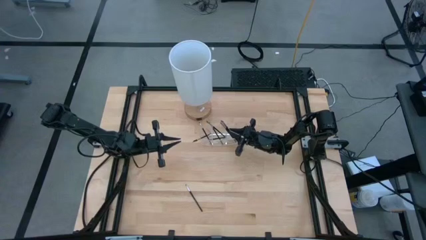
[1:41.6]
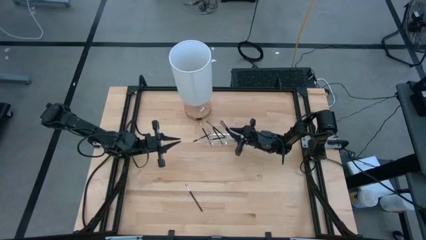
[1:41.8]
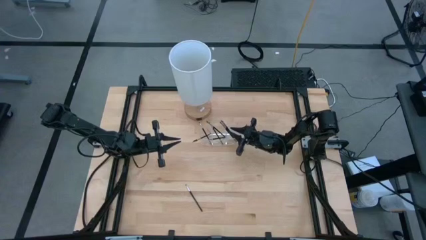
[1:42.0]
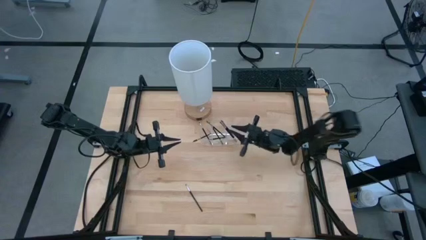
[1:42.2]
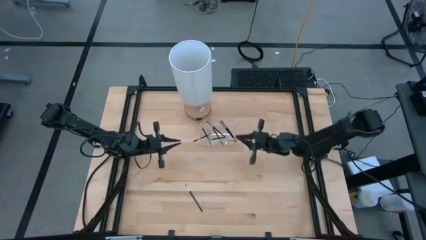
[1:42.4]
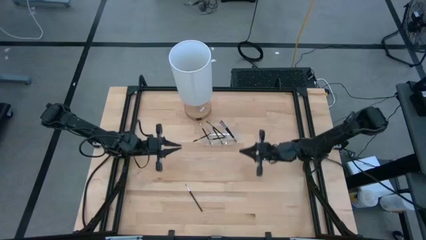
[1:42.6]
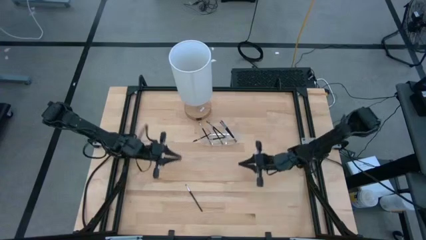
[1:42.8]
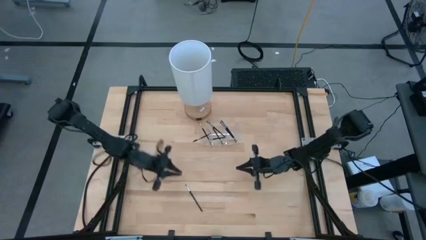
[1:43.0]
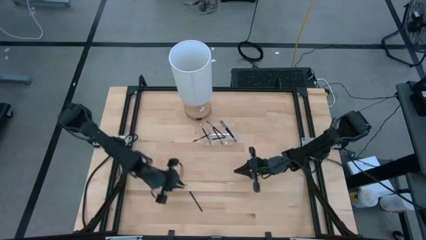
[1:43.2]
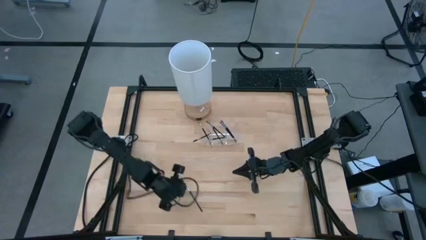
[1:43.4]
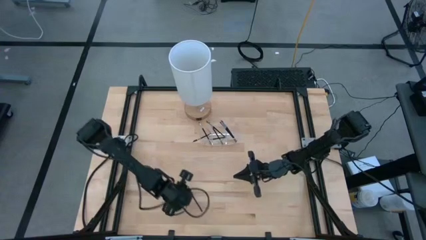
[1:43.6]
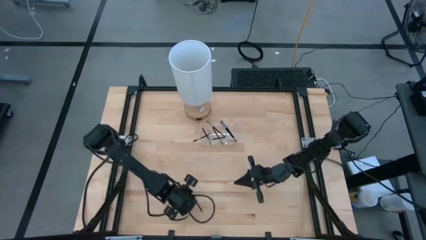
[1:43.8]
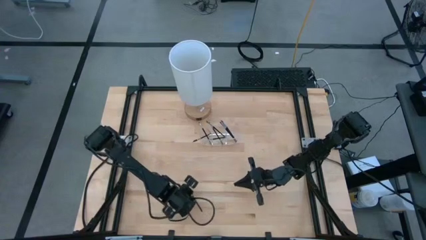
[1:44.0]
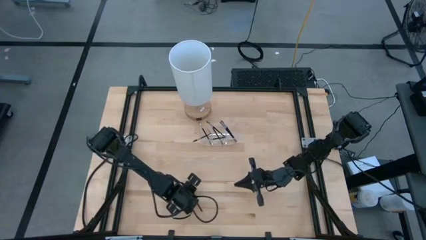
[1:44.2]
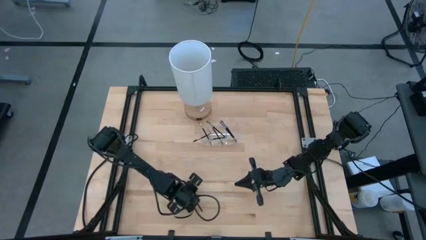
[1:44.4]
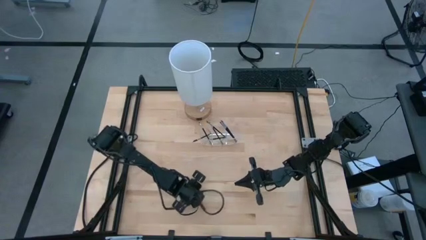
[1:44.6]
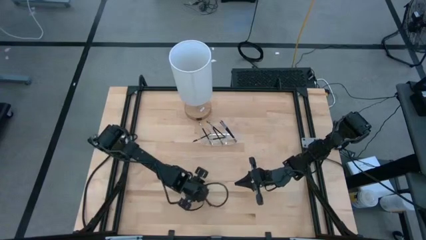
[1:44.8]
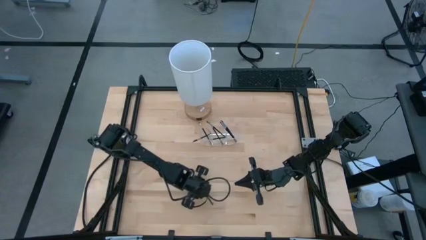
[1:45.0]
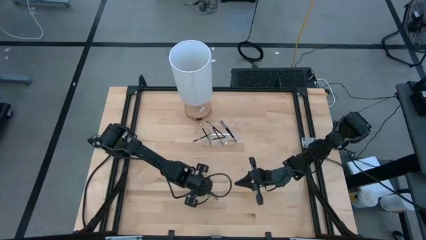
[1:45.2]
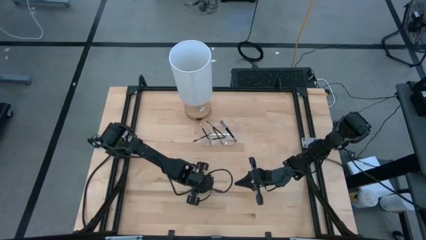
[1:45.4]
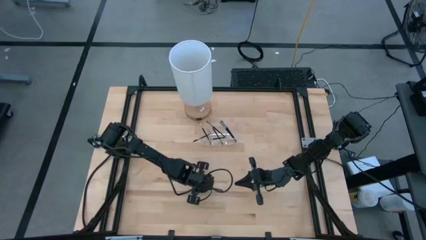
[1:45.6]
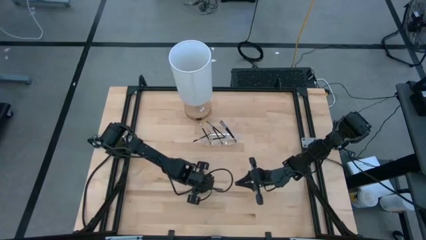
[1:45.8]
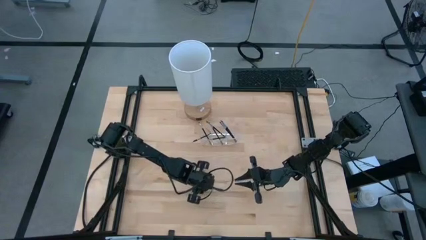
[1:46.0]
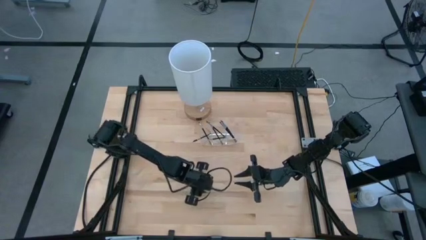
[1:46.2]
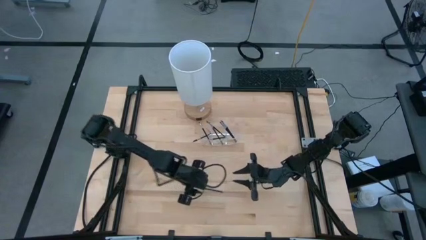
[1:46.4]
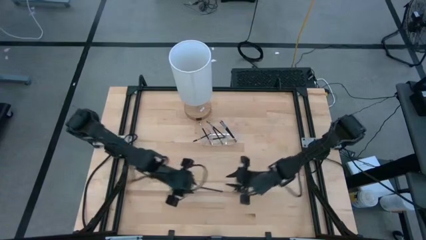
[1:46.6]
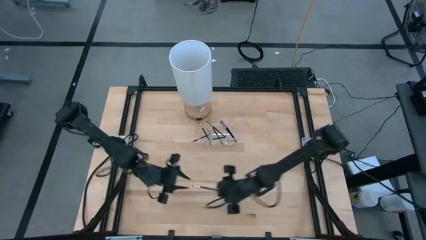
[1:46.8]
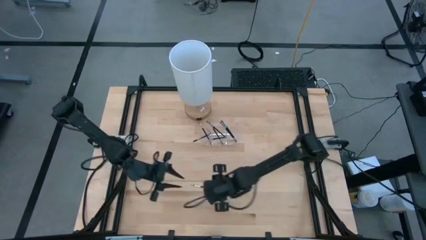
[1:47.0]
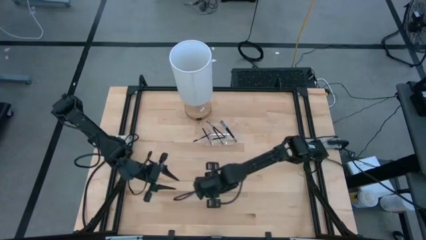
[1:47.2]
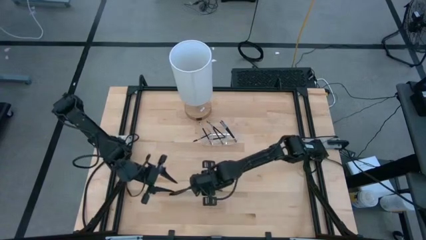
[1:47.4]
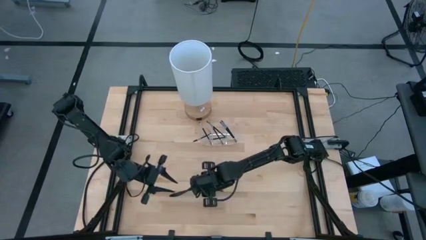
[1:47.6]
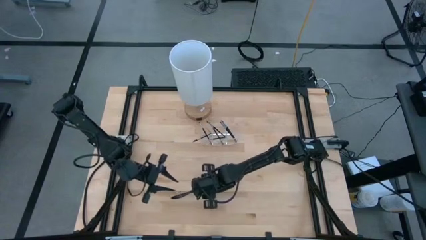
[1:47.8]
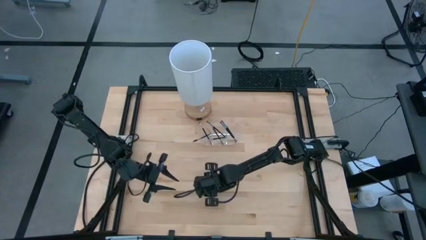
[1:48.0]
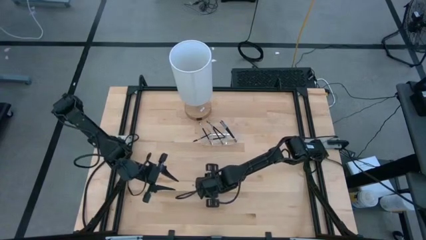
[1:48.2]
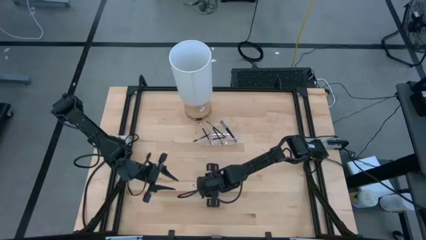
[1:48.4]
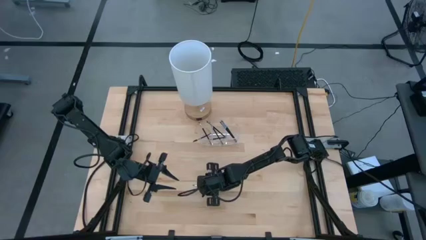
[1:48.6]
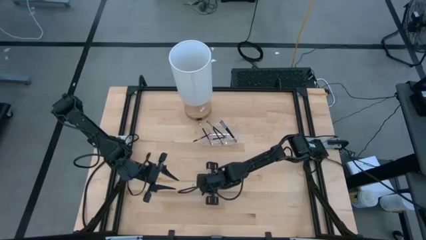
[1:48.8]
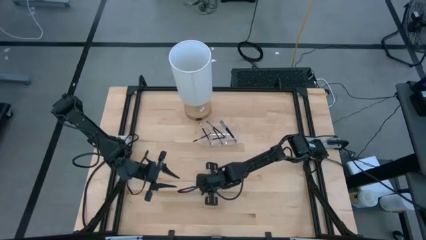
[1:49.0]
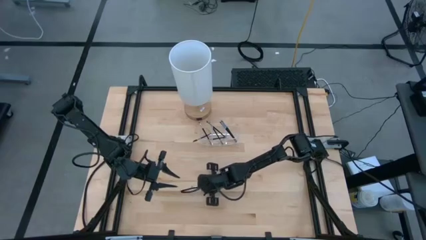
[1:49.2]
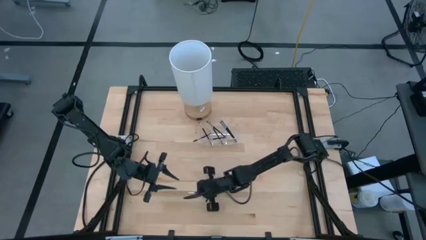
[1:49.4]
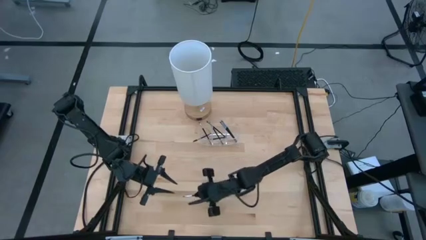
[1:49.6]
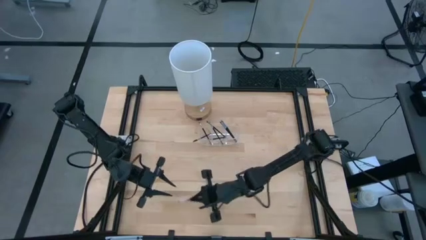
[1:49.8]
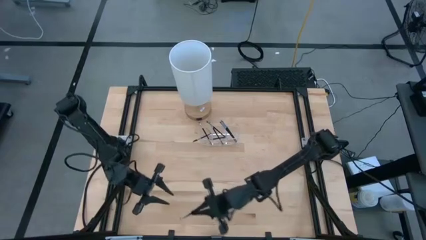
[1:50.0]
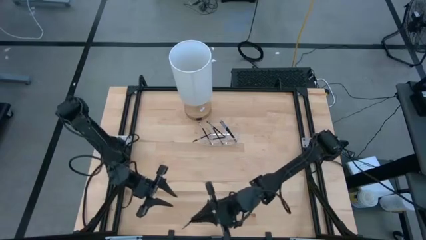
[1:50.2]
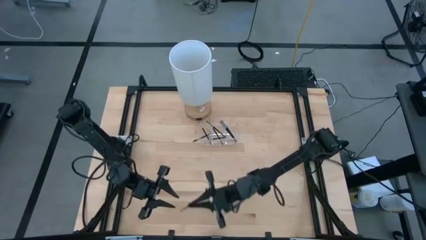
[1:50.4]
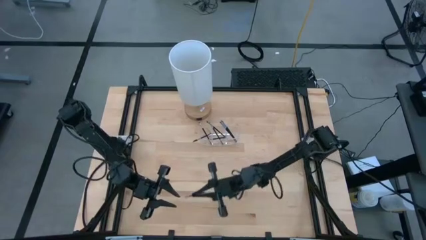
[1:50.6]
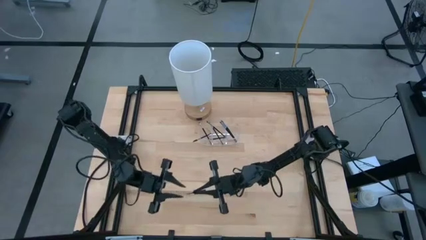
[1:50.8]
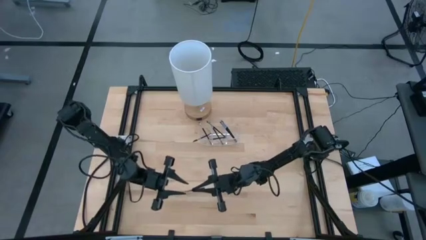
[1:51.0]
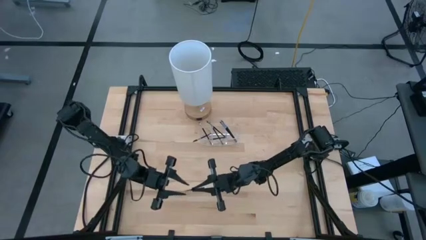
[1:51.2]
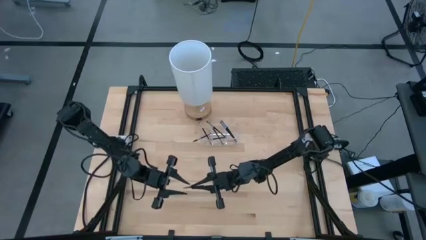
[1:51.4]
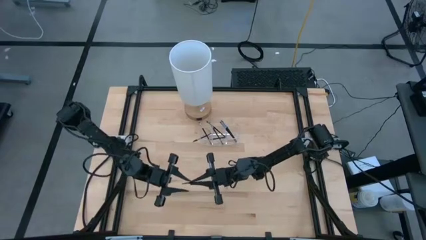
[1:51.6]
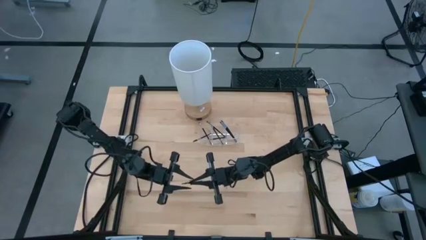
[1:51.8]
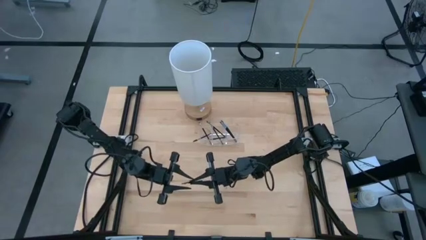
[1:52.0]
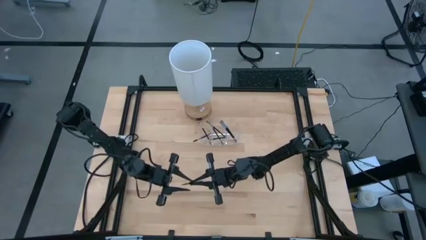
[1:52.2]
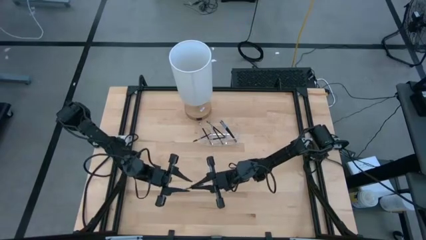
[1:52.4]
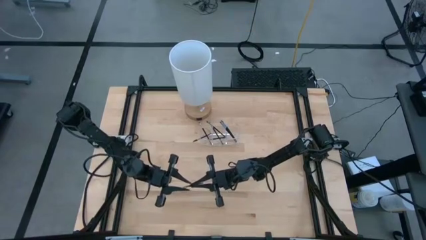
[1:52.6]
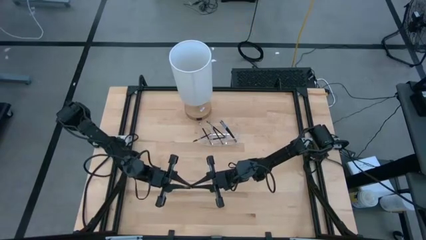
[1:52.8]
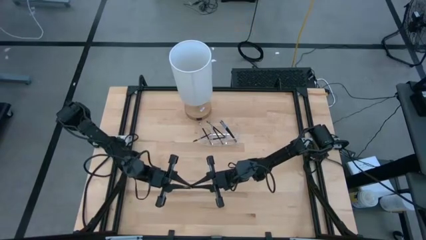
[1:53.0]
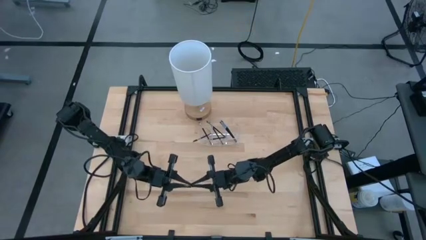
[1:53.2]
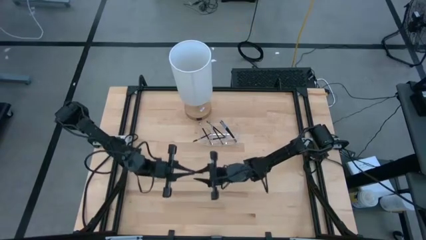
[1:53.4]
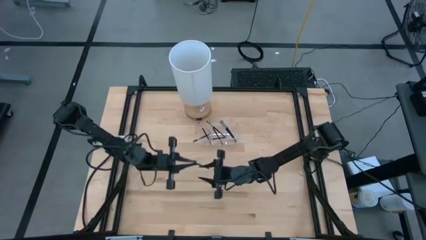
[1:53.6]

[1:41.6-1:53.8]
Task: Pick & Place Makeup Supplies
Put the makeup brush into the transparent organizer
